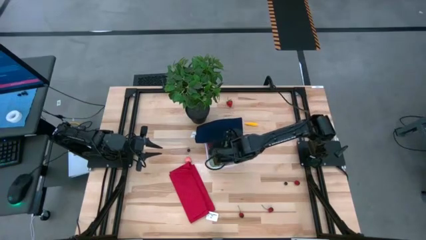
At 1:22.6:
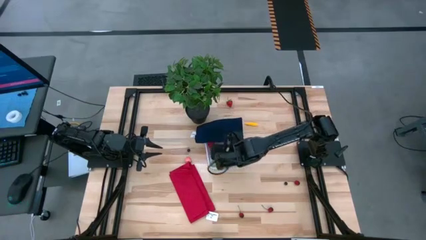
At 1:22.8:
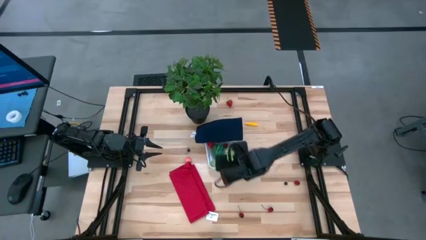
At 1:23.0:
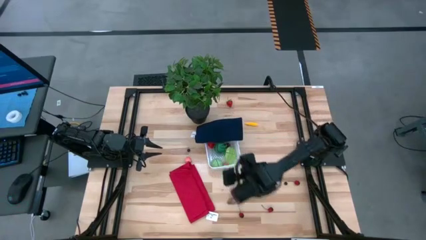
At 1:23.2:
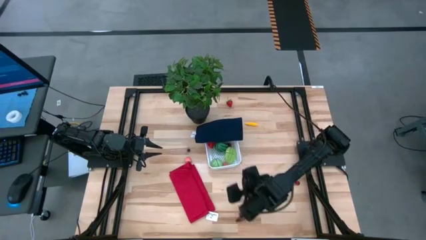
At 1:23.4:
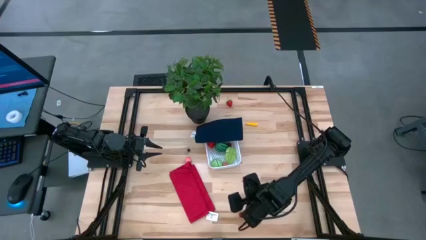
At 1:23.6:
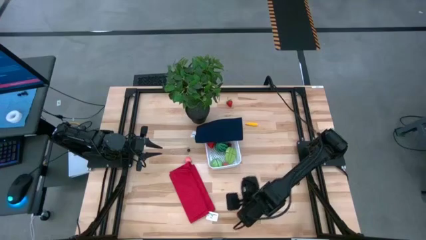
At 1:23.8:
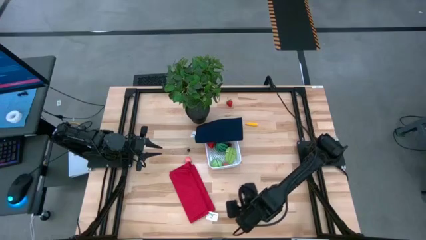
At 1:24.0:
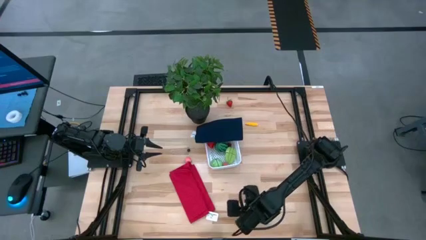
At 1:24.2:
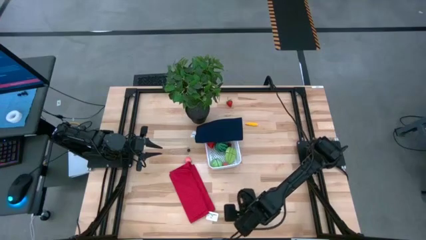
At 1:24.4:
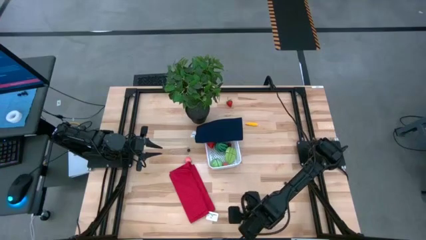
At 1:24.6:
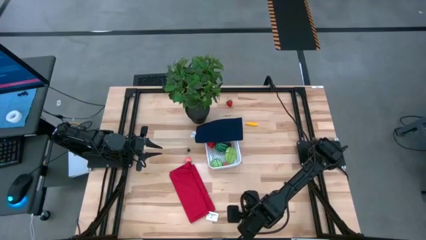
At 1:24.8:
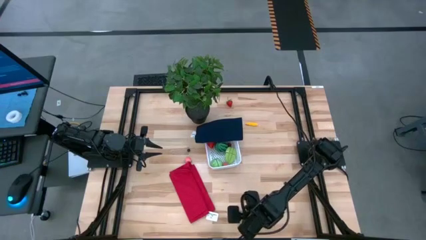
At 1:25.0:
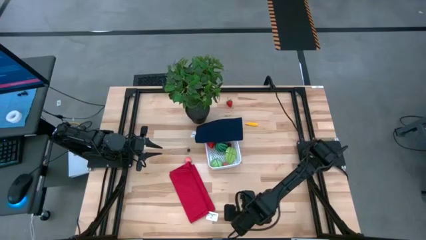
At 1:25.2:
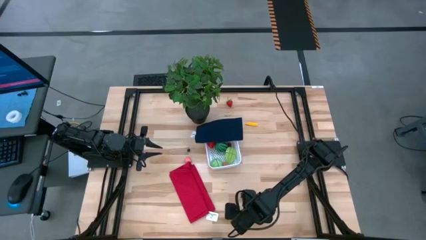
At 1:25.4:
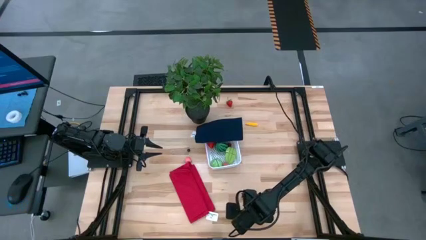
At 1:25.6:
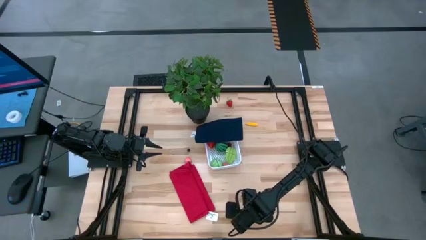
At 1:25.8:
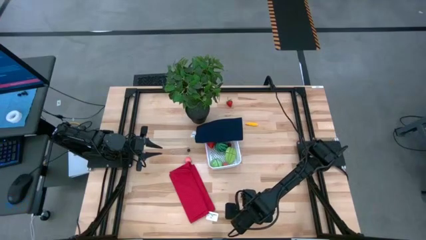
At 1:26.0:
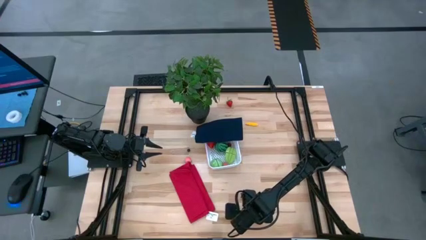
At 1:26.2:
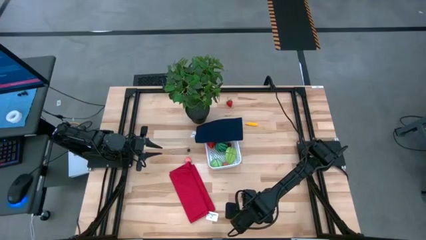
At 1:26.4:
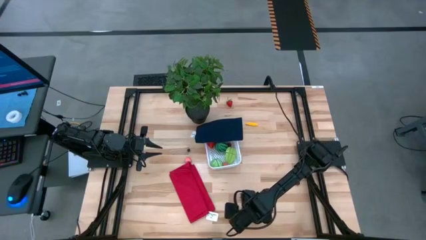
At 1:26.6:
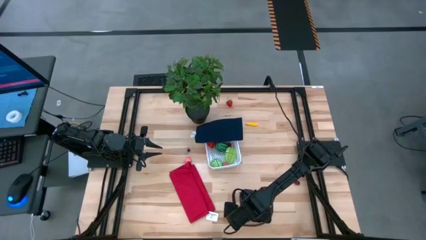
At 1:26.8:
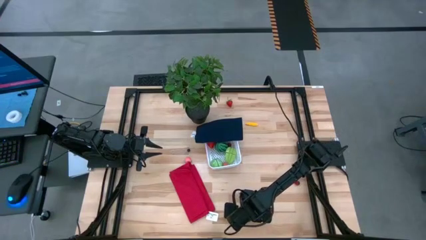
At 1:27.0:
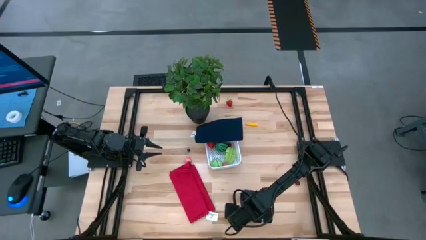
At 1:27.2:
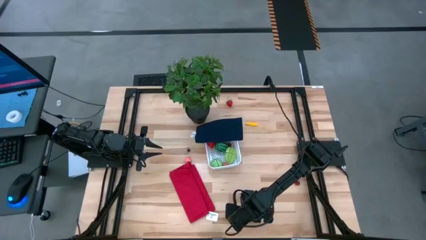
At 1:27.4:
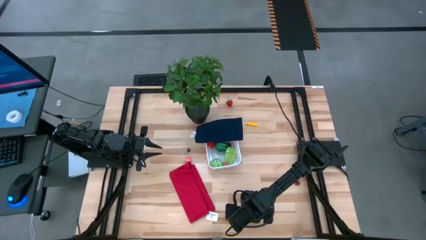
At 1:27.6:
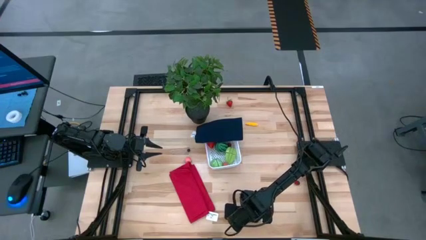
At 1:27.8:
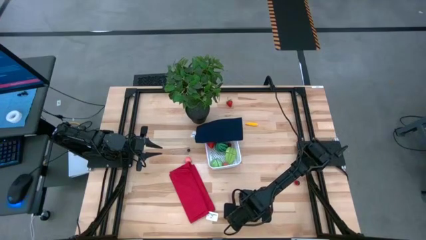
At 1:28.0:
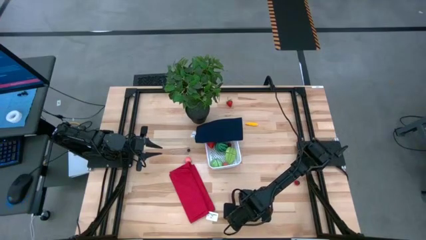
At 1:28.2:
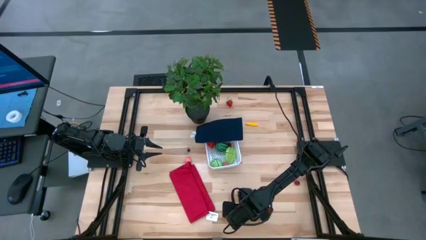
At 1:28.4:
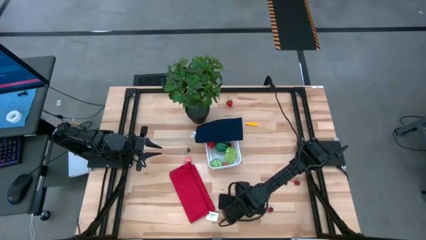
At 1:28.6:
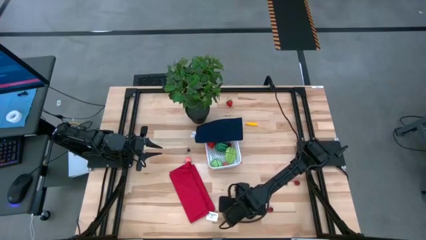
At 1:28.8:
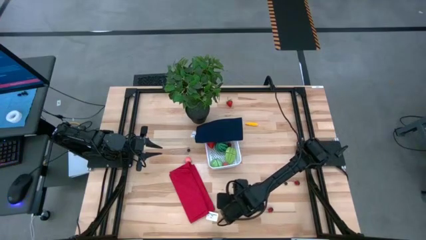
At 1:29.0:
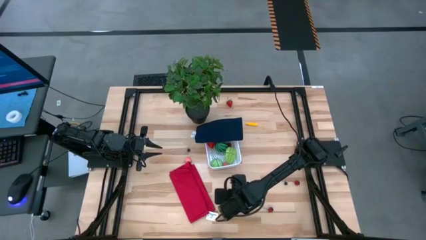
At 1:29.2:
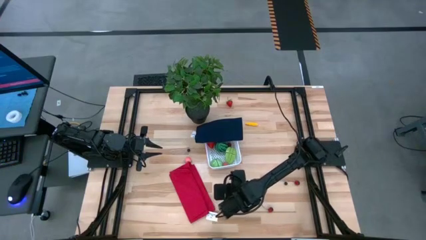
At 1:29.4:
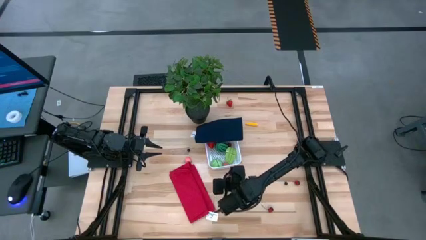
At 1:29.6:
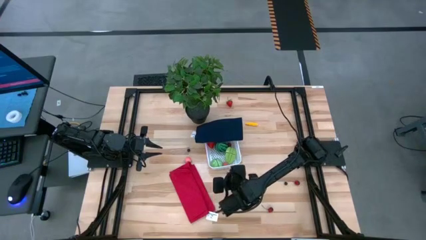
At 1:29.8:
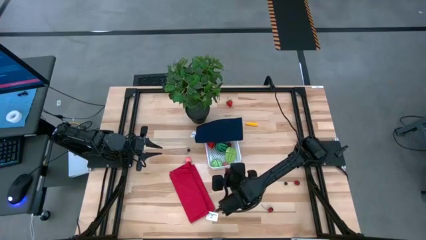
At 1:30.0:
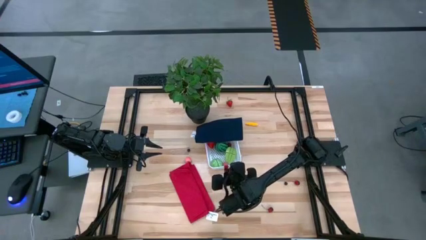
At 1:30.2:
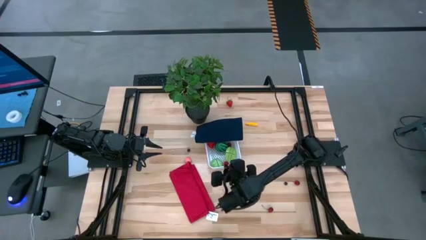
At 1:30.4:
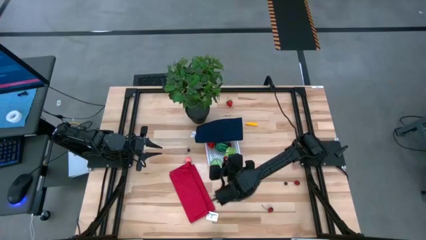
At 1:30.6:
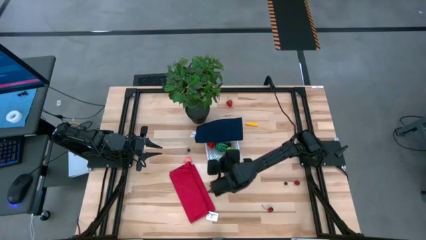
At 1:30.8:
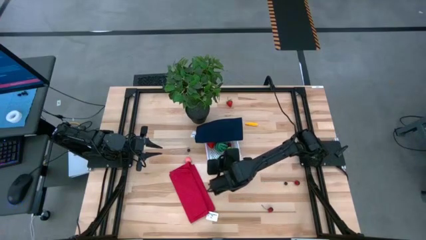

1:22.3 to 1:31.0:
Task: Pick and placing Produce into tupperware
Put the cherry into the bin

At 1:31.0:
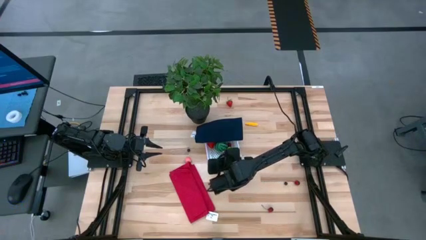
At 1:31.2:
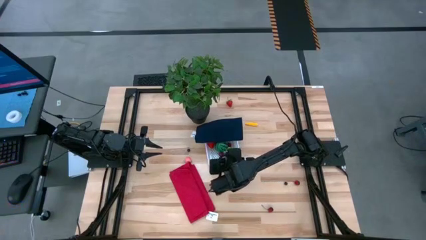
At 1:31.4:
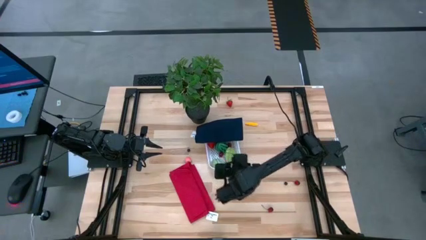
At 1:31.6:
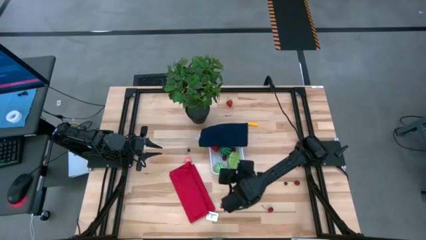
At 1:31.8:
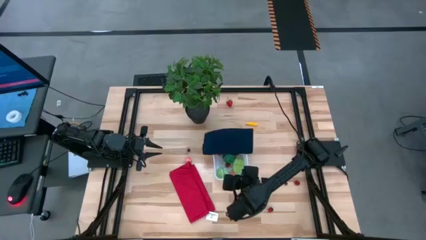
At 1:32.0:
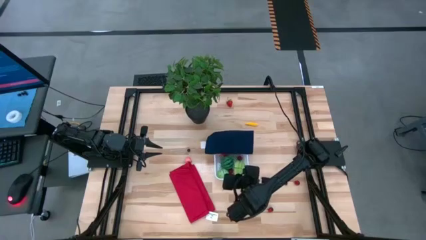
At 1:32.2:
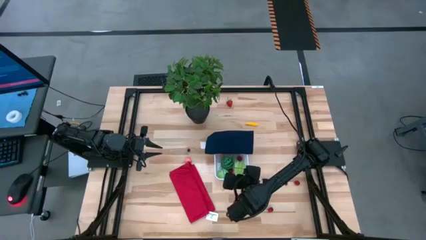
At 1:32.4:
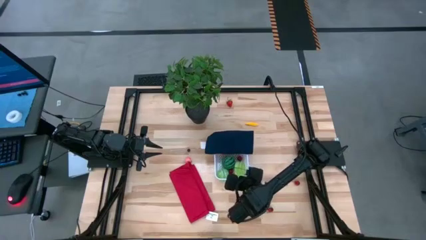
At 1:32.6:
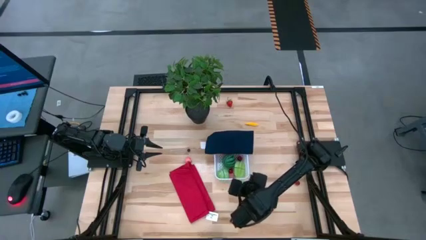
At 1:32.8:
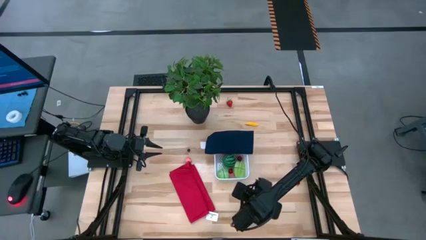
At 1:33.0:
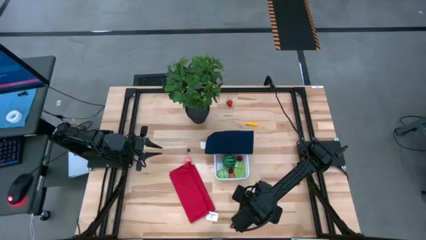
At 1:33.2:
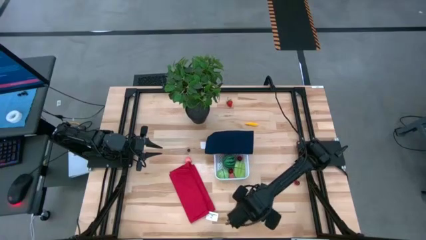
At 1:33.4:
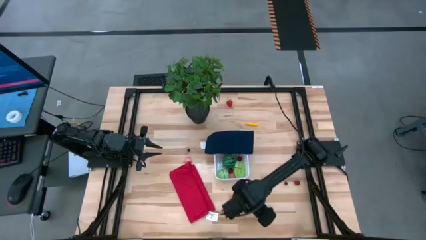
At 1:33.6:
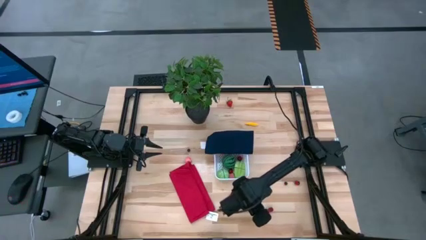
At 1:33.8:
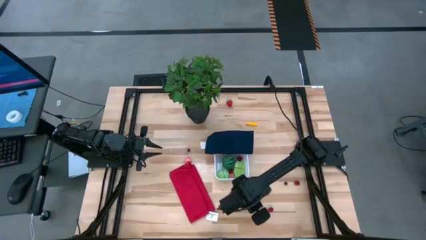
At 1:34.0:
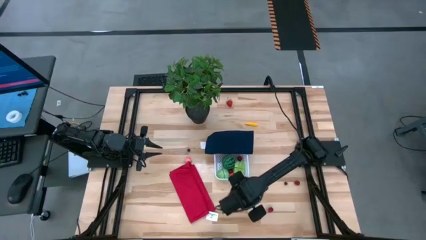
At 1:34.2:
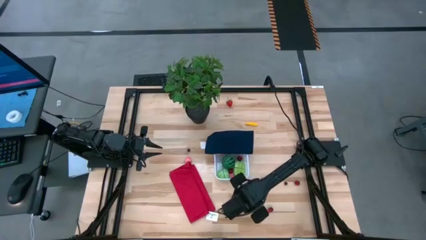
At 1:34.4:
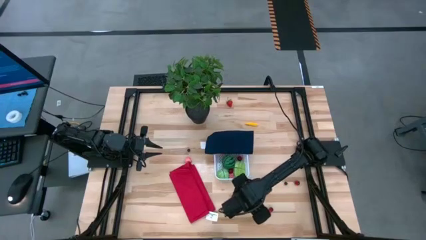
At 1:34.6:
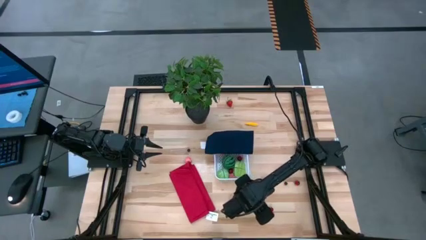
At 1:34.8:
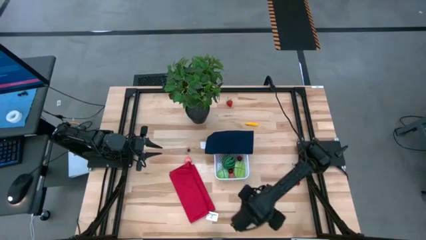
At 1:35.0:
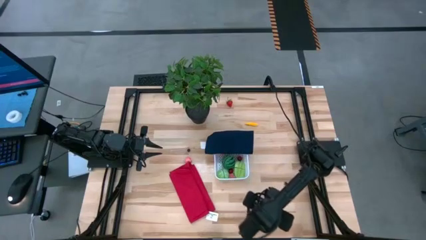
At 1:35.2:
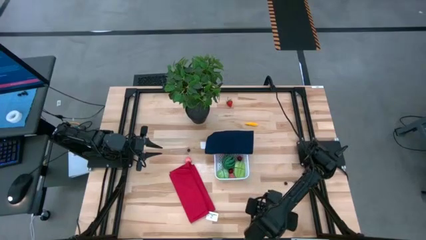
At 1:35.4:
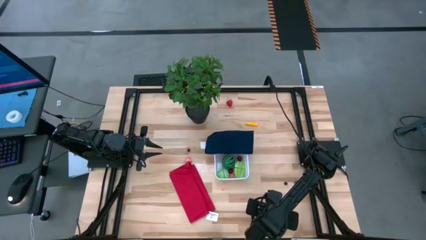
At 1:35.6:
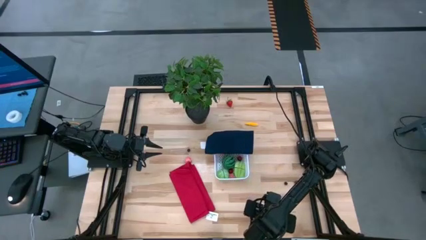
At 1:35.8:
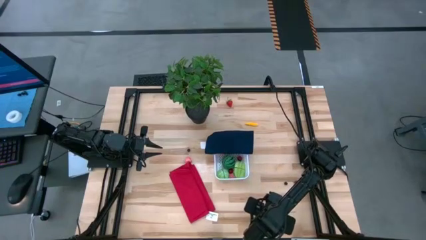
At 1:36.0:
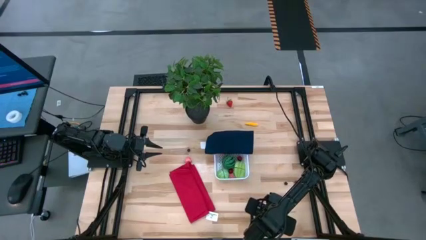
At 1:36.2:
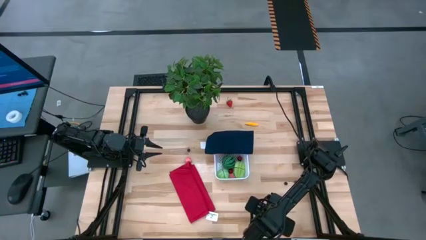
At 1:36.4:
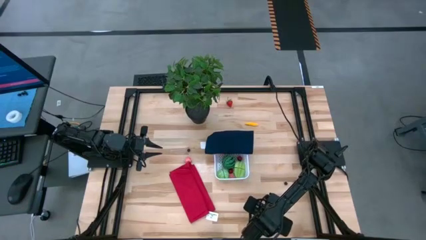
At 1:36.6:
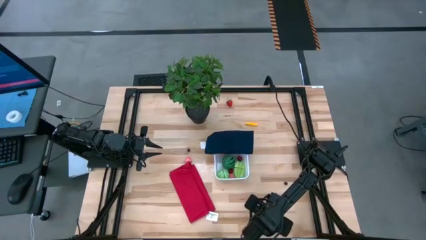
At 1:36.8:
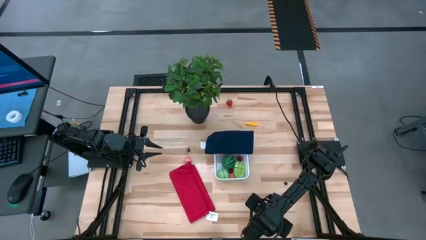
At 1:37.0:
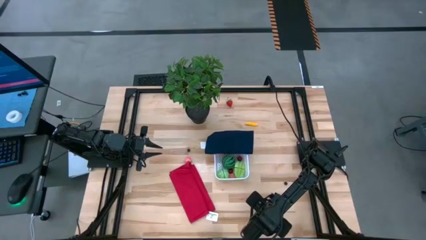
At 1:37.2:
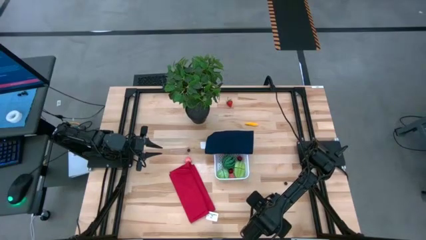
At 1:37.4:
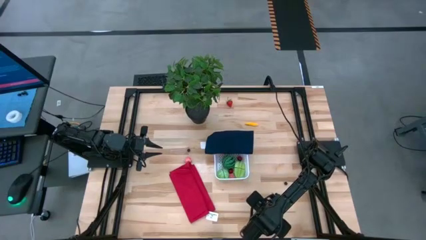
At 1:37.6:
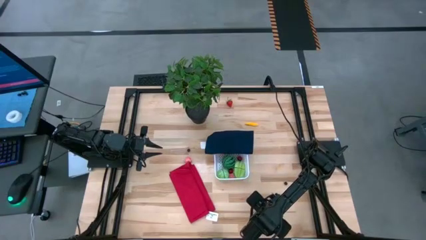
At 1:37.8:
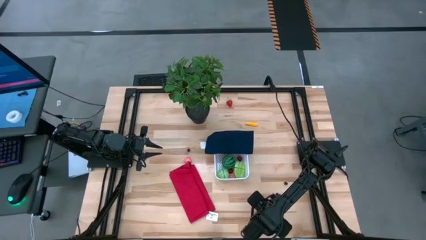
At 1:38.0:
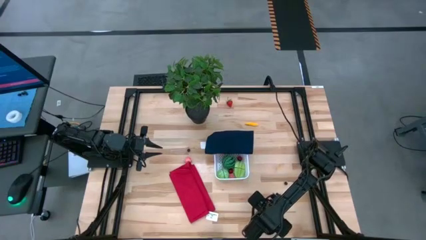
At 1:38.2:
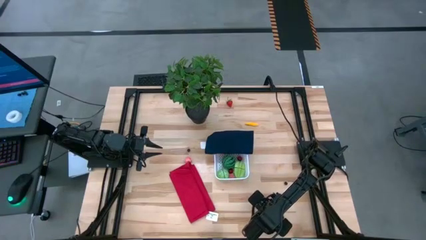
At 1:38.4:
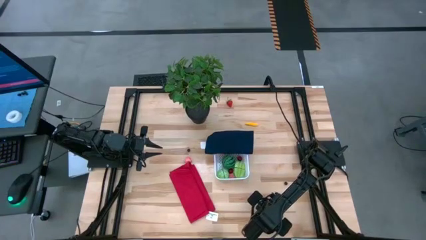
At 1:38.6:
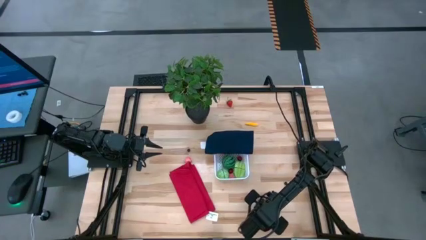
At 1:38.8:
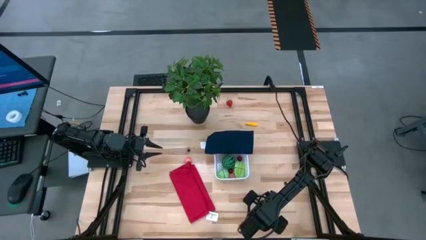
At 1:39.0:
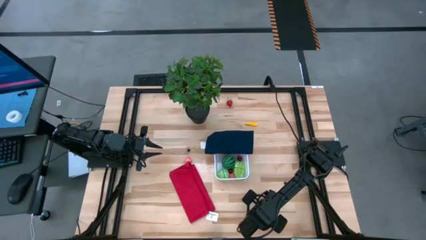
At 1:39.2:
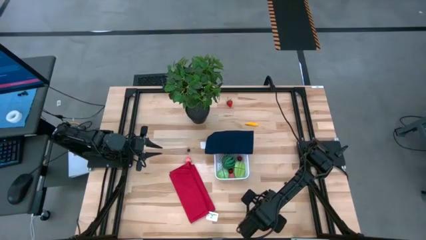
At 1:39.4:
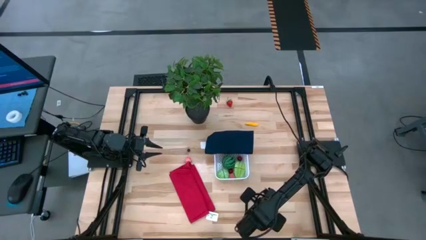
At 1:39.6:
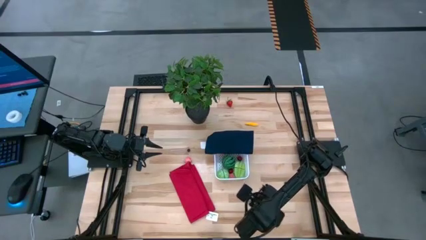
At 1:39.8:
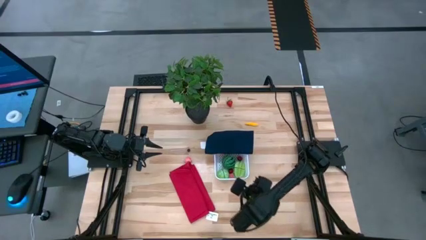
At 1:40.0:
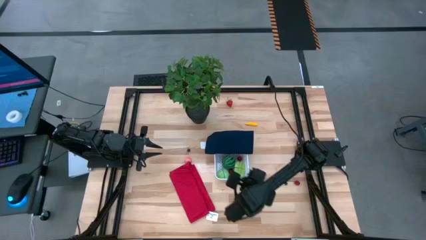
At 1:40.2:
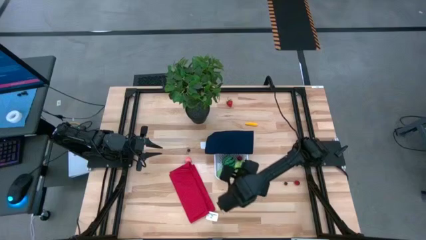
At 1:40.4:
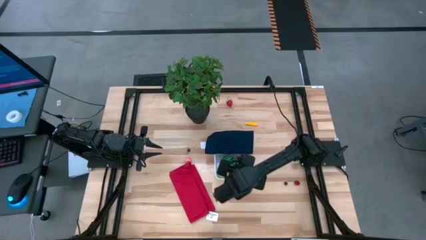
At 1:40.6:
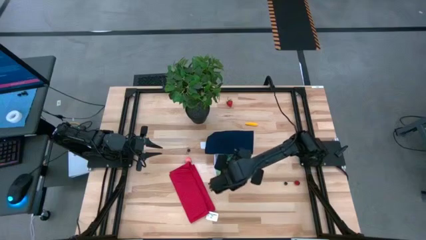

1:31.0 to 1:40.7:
Put the cherry into the bin
